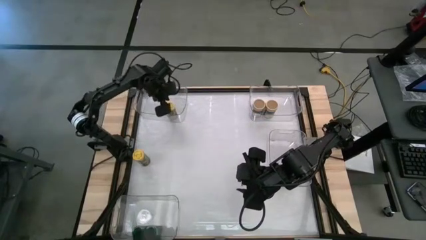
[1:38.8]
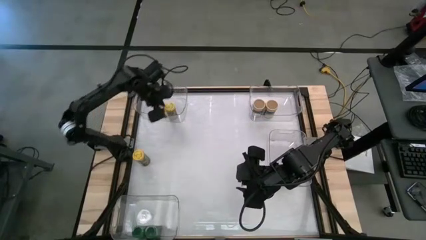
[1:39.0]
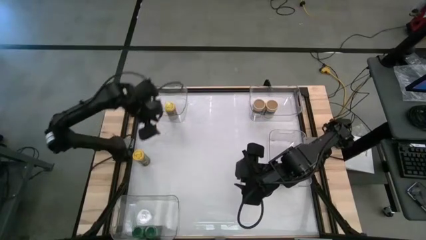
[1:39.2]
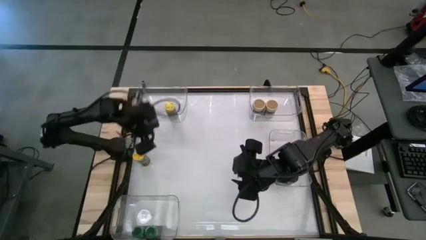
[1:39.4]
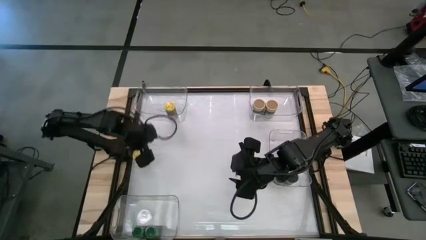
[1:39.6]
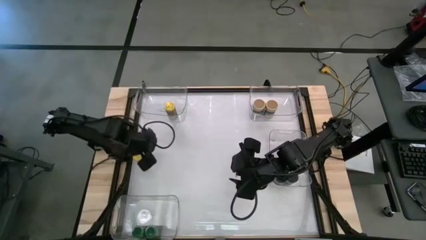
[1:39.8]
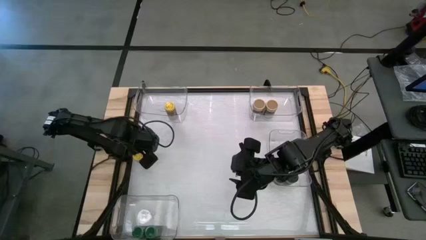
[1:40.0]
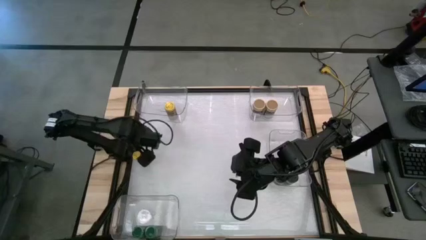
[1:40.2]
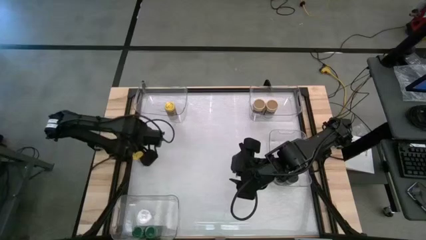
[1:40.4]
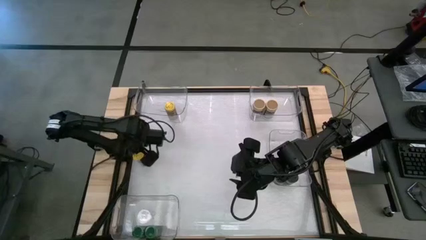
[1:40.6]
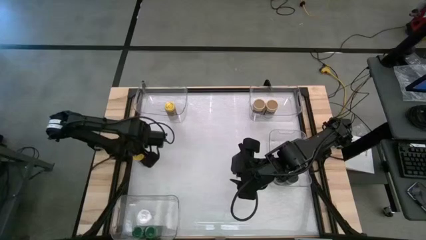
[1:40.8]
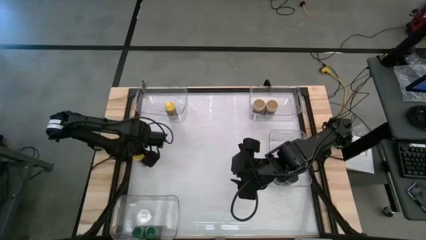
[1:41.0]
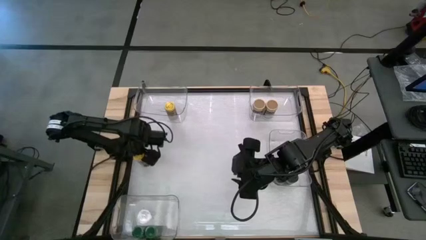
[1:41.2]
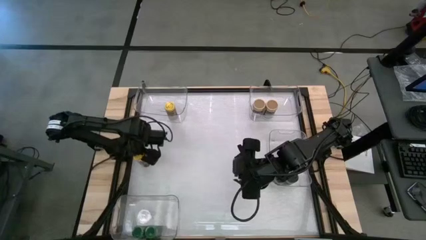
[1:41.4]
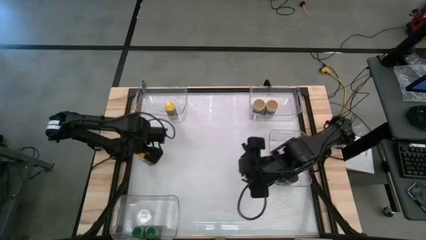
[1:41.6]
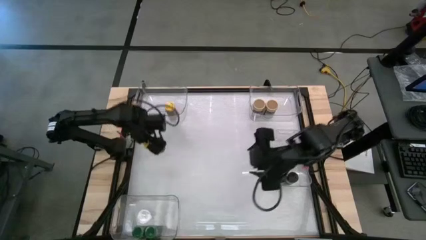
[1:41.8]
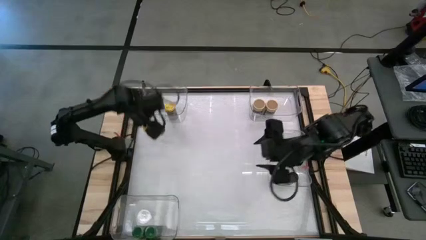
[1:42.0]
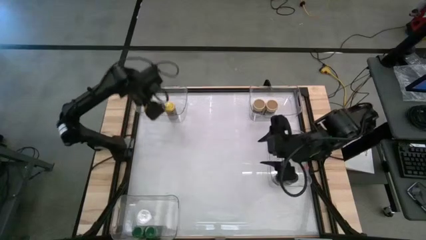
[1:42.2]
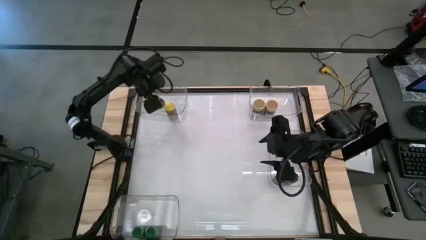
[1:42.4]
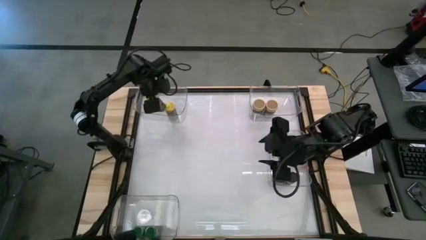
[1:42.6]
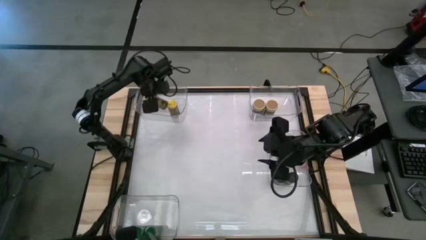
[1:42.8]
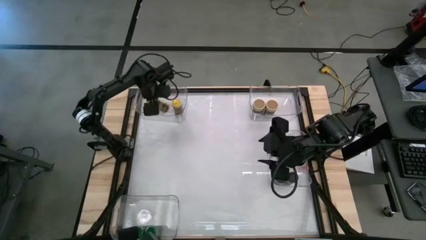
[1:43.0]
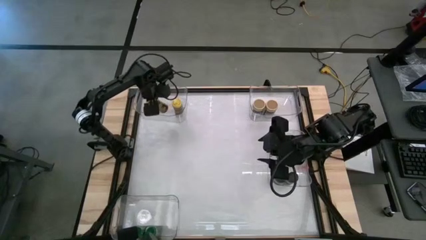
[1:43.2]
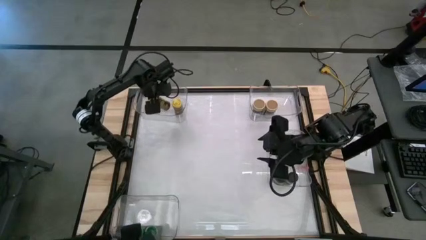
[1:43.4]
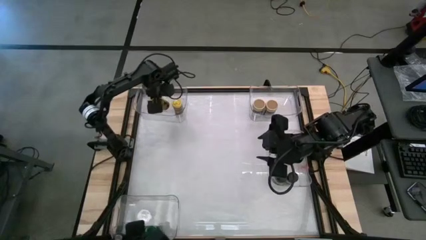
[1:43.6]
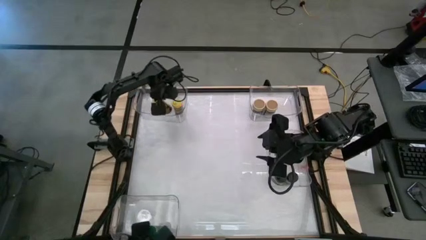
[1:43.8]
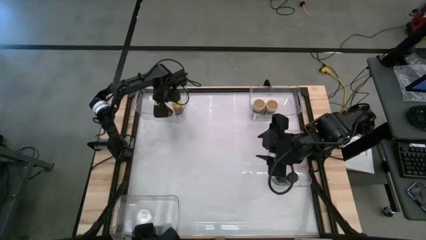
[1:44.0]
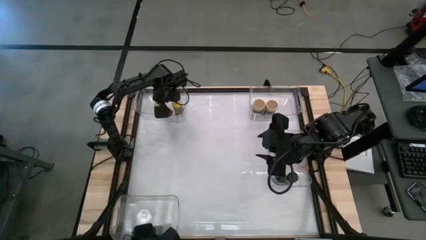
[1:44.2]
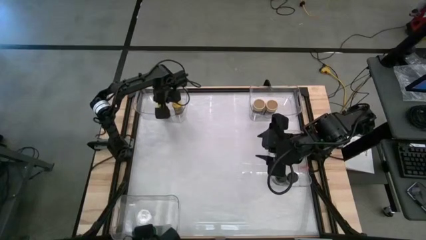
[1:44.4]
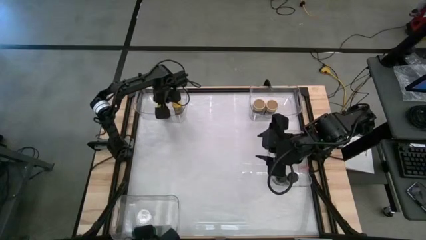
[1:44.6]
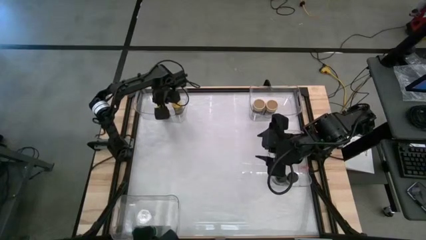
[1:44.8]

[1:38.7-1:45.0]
Task: Sort spices by type
Put the yellow seasoning bottle into the top left transparent bin

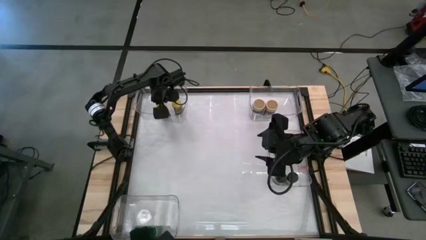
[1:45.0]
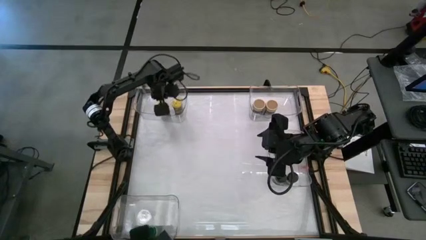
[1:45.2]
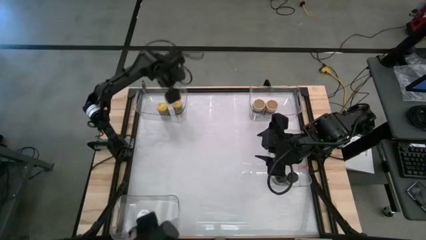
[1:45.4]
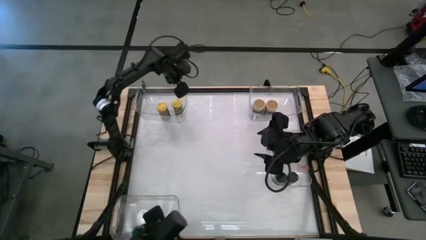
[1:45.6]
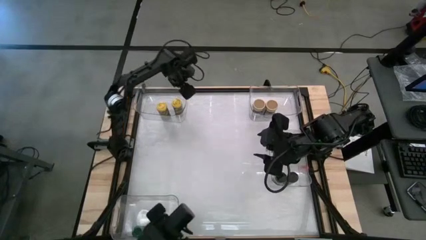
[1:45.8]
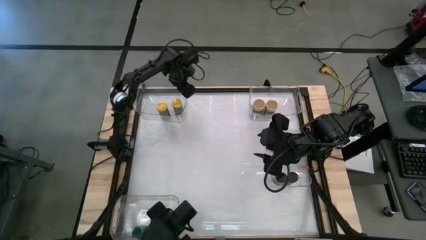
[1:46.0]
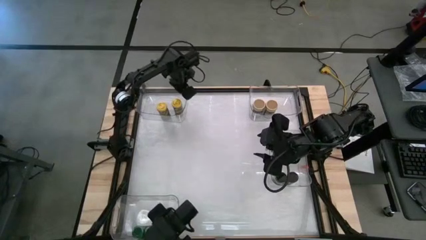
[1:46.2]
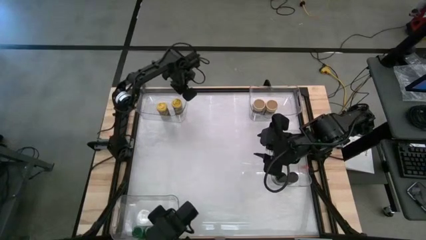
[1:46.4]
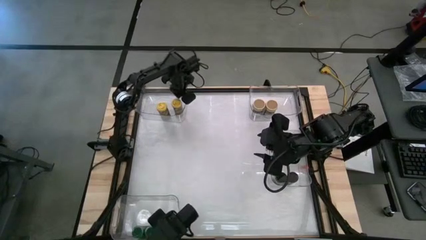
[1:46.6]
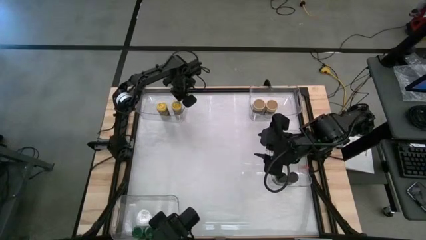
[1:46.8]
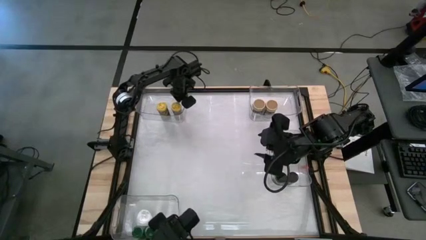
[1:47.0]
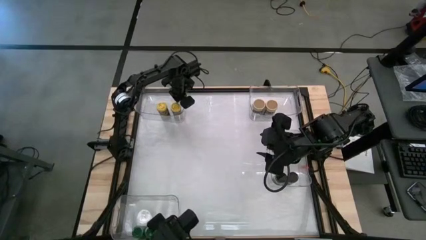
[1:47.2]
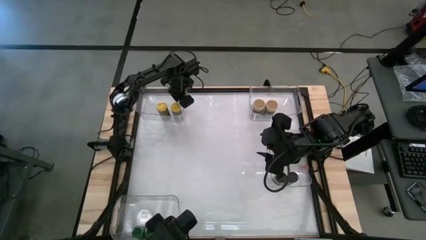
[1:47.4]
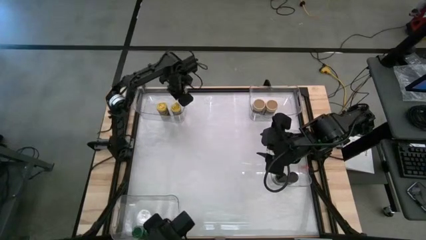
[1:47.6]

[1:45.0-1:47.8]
Adjust the yellow seasoning bottle into the top left transparent bin

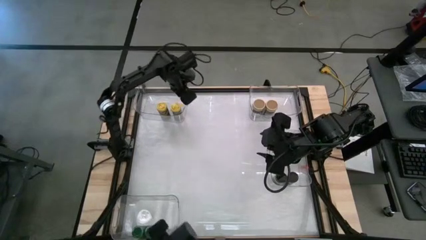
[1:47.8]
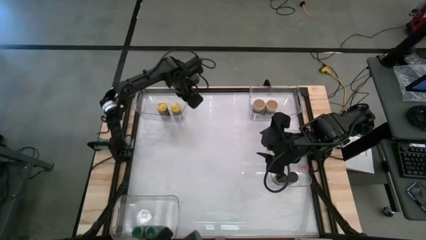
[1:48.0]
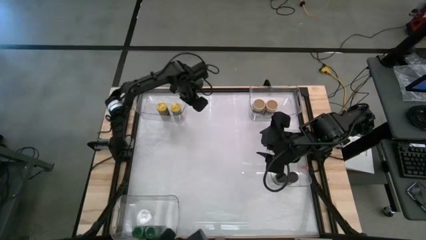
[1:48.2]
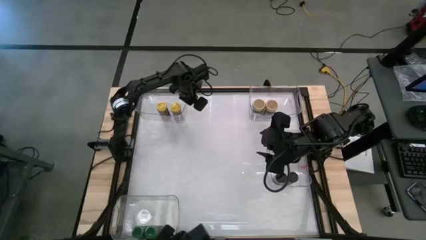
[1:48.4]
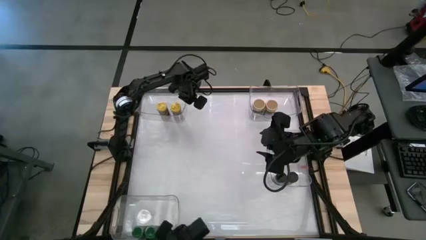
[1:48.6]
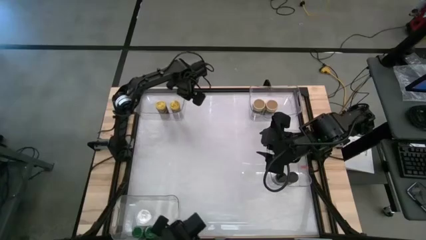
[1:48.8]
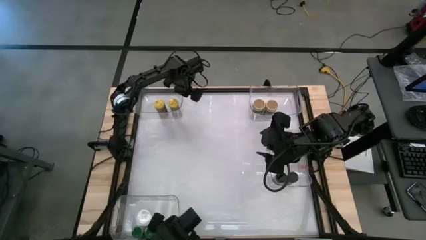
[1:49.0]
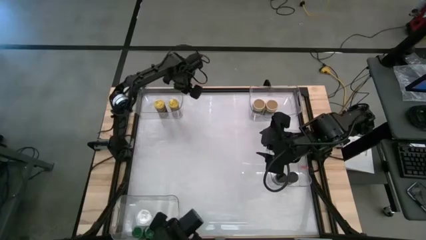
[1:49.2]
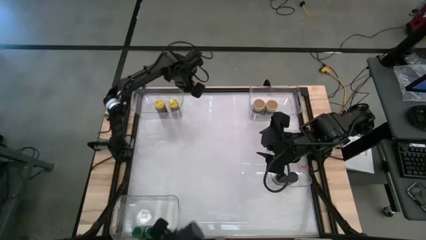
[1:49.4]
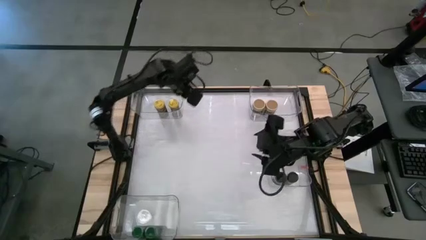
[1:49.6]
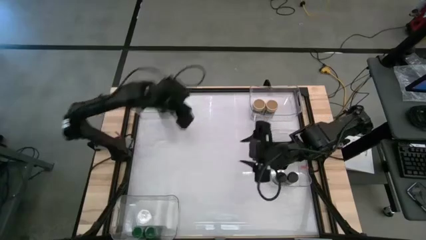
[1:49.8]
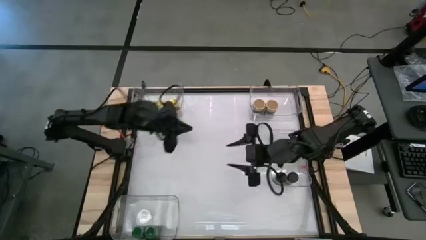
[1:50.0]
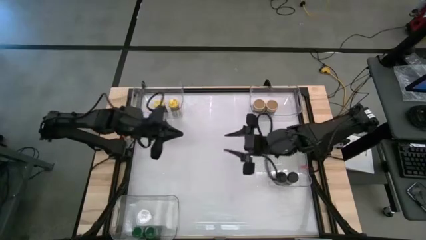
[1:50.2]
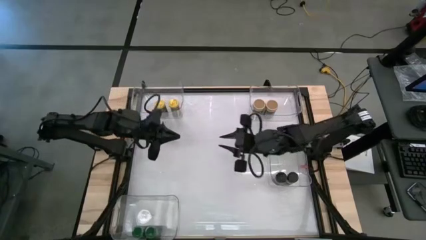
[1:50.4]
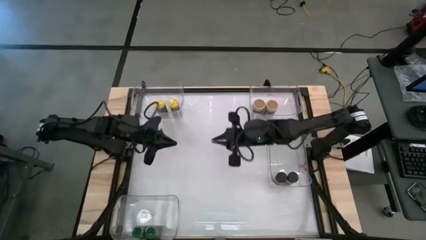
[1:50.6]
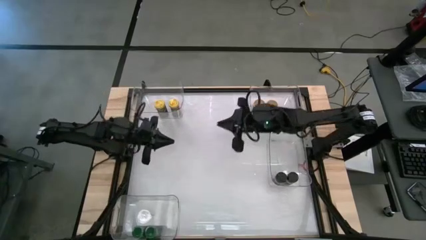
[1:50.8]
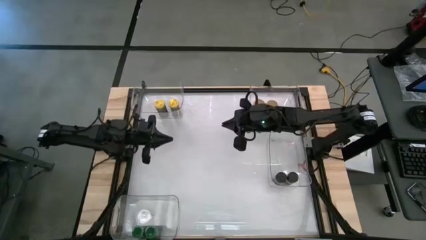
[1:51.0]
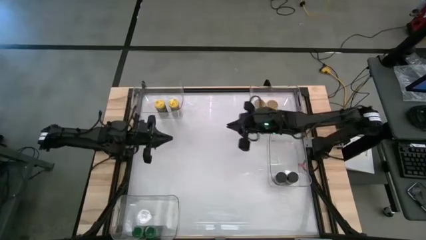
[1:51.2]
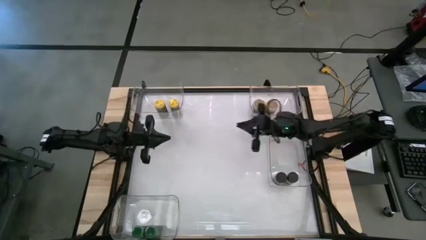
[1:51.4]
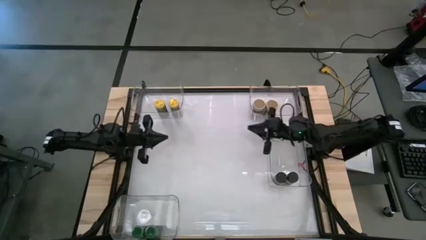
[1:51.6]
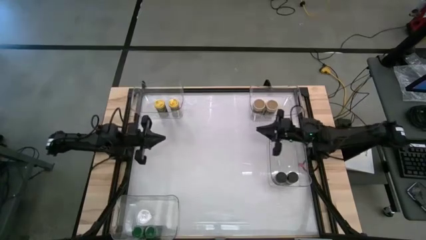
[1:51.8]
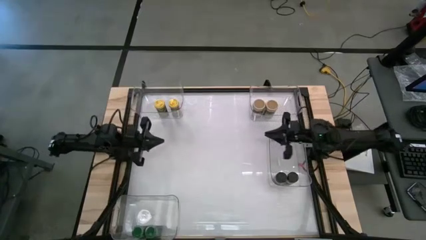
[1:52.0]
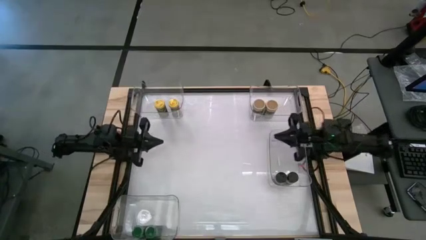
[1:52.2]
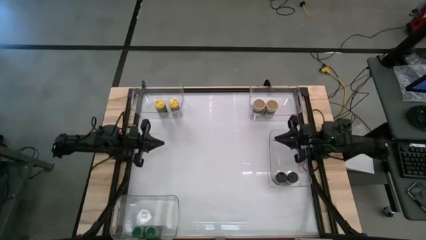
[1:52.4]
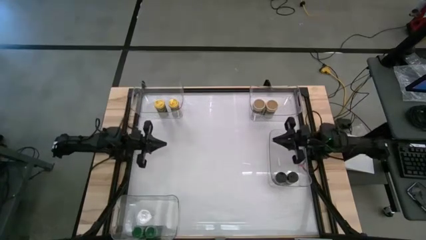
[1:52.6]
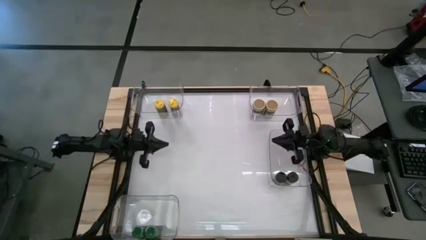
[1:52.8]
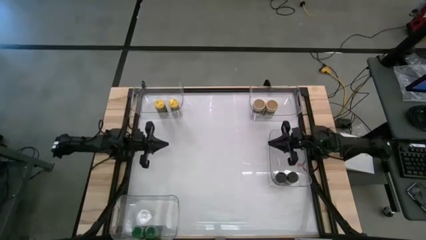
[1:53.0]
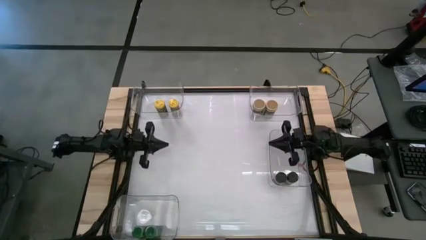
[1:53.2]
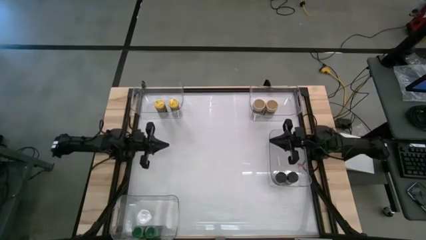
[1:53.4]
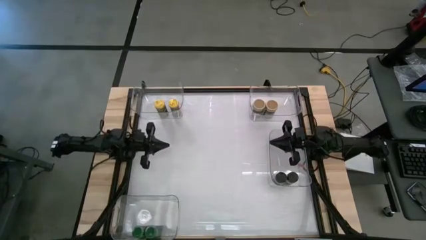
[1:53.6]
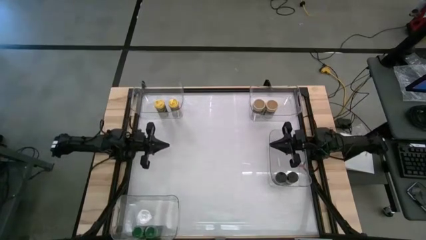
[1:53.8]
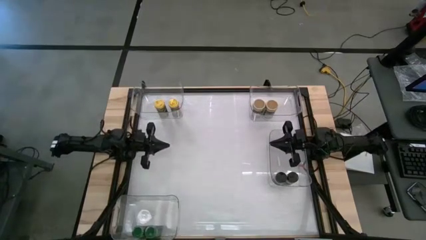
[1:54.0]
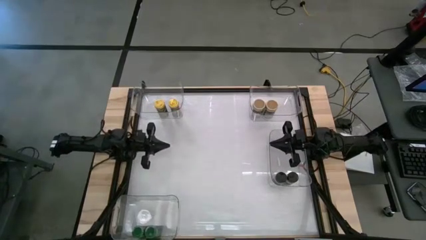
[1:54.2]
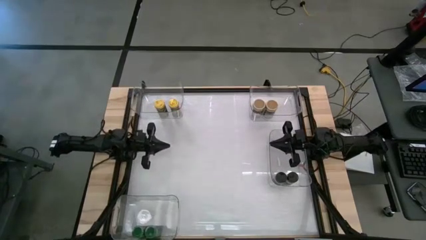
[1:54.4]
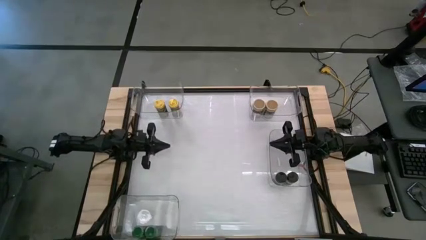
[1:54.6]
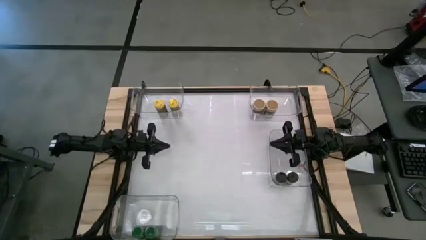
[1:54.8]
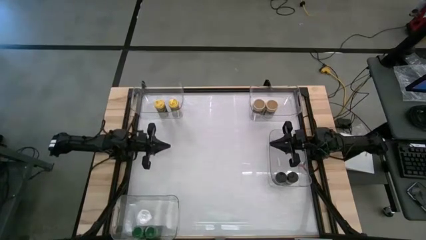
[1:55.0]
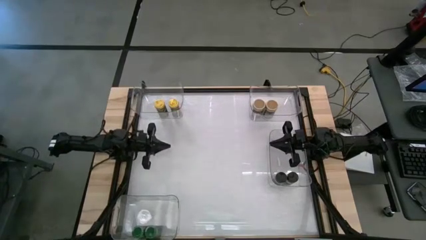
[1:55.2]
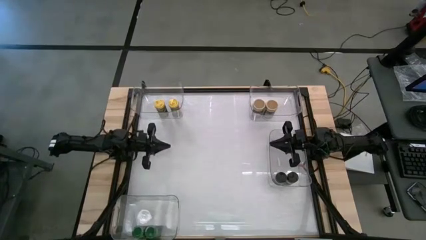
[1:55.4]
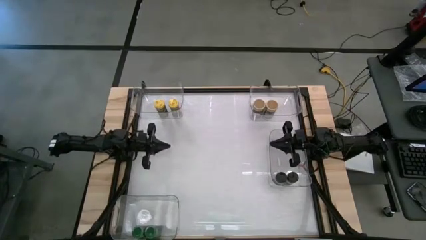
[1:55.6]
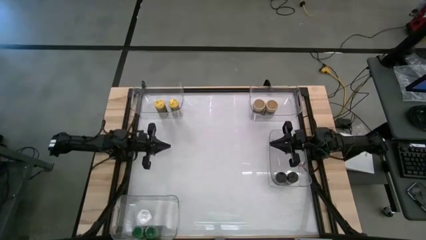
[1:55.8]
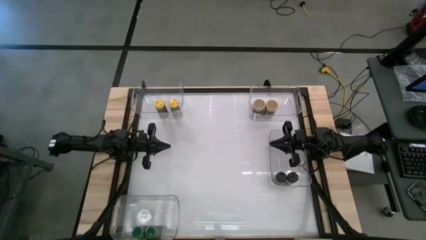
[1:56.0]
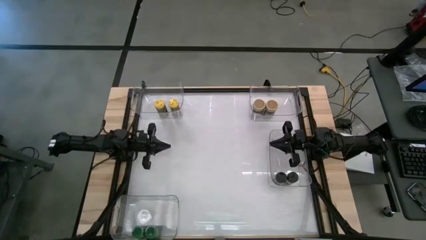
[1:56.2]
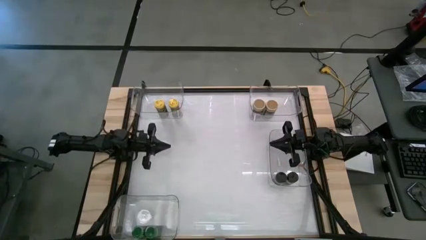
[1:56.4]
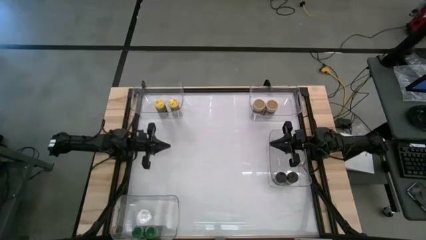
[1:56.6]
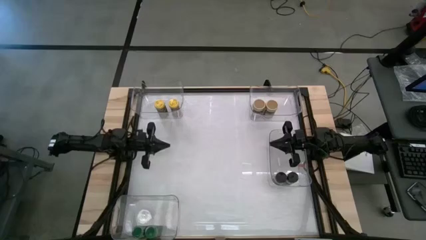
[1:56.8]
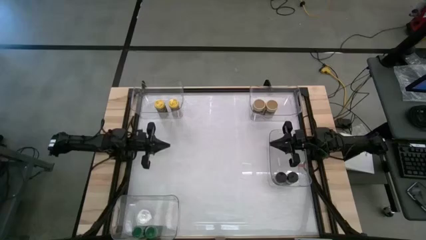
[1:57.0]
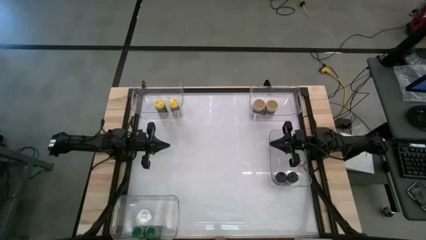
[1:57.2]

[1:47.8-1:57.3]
Return to Home Position
